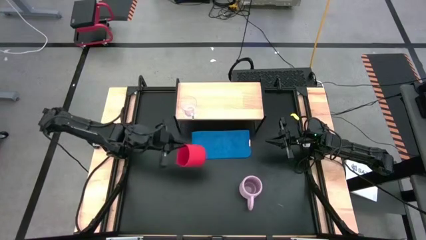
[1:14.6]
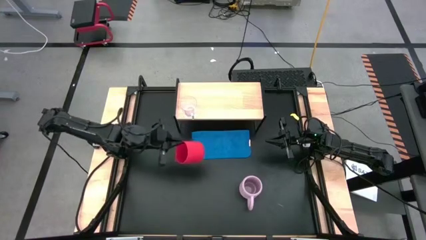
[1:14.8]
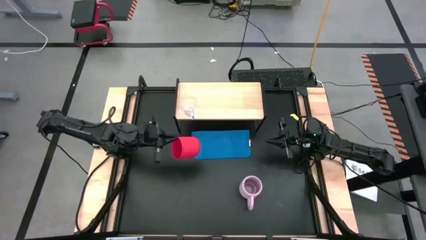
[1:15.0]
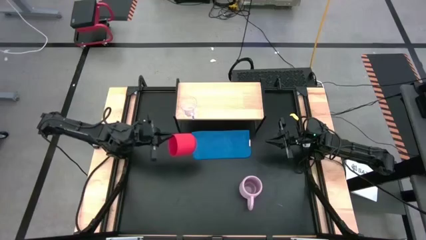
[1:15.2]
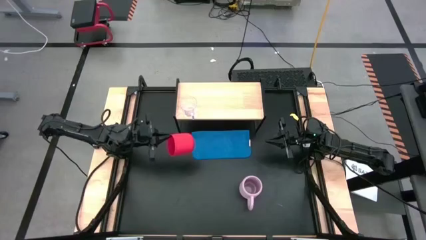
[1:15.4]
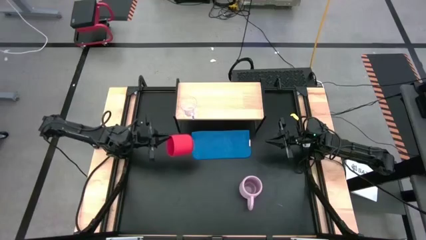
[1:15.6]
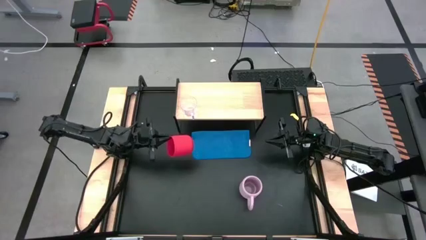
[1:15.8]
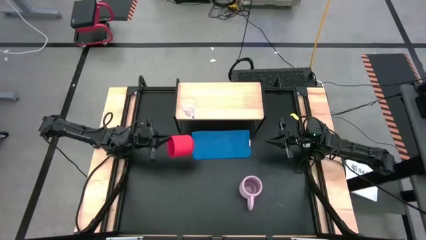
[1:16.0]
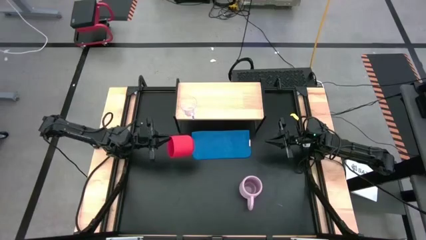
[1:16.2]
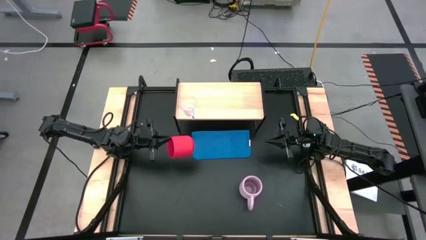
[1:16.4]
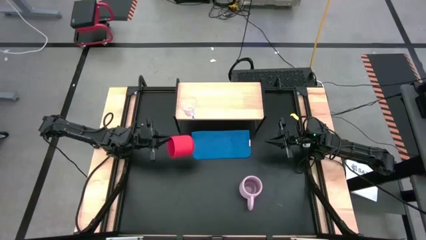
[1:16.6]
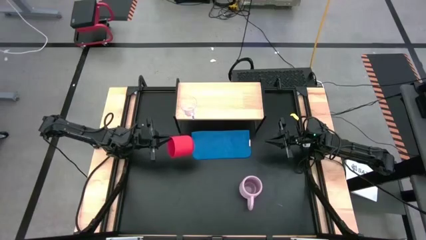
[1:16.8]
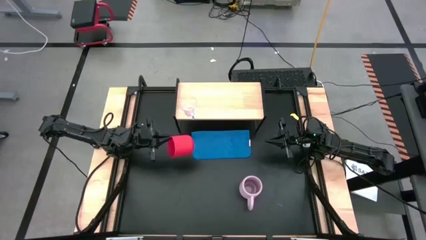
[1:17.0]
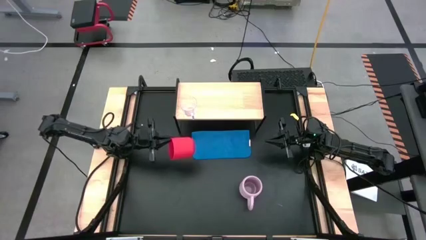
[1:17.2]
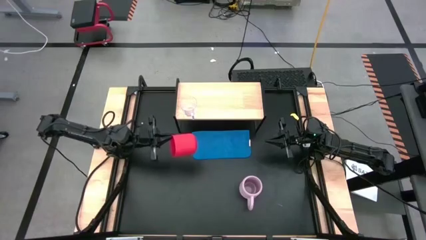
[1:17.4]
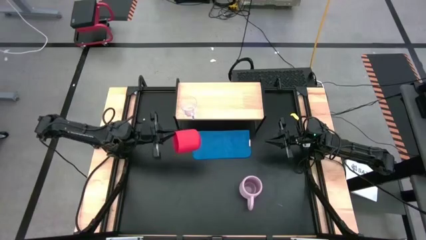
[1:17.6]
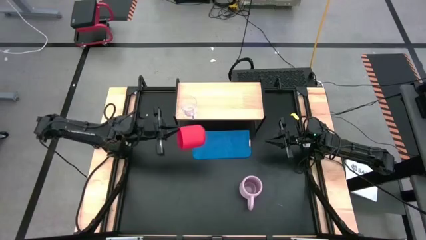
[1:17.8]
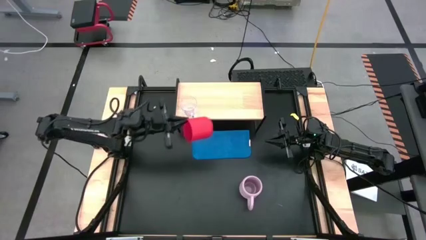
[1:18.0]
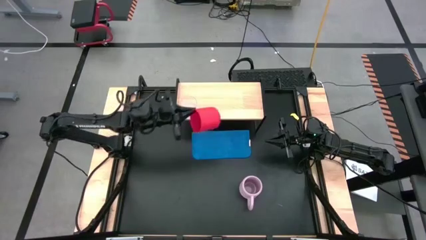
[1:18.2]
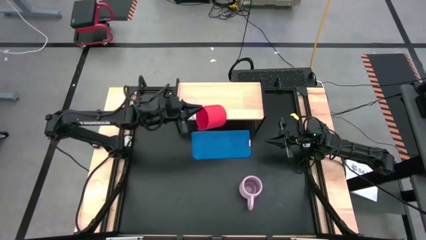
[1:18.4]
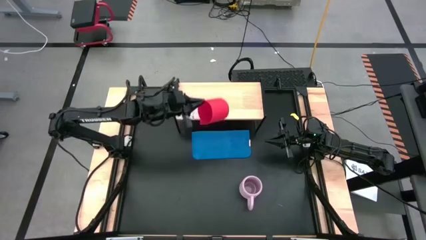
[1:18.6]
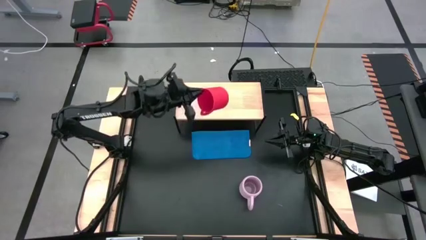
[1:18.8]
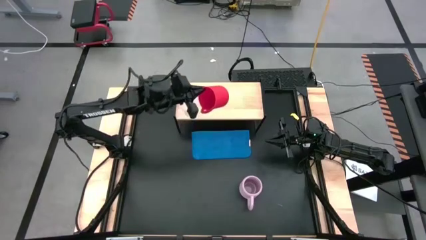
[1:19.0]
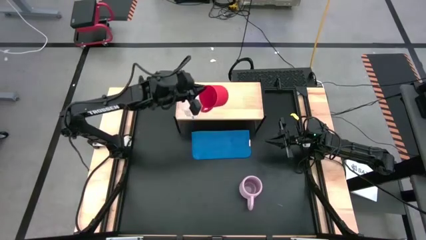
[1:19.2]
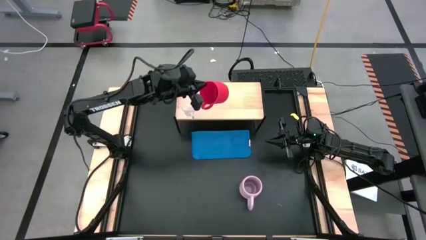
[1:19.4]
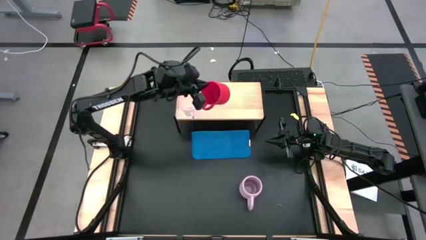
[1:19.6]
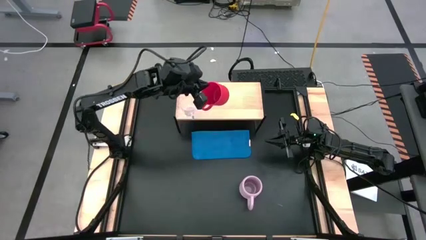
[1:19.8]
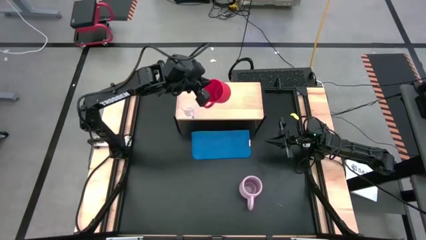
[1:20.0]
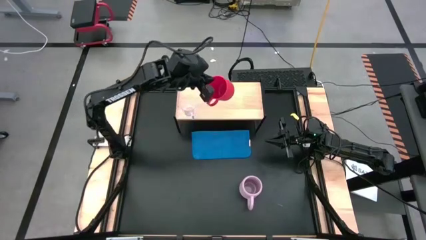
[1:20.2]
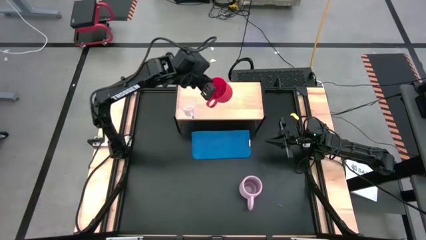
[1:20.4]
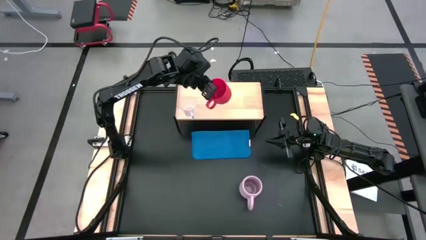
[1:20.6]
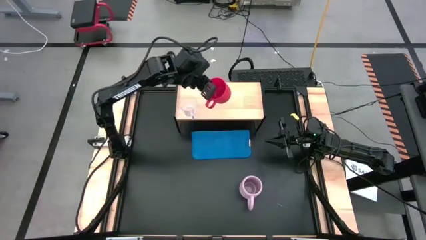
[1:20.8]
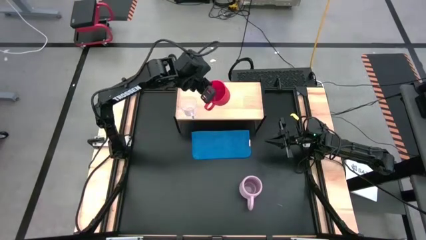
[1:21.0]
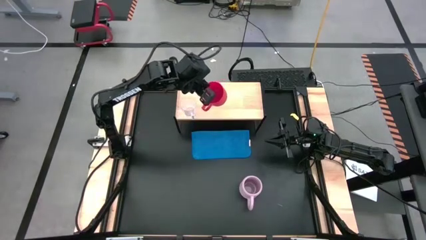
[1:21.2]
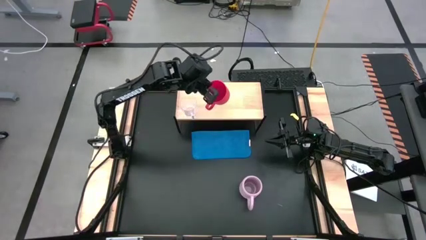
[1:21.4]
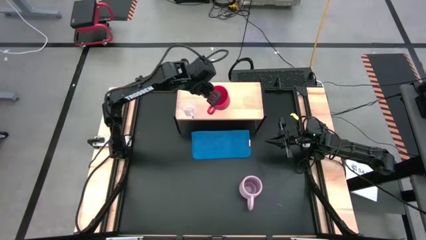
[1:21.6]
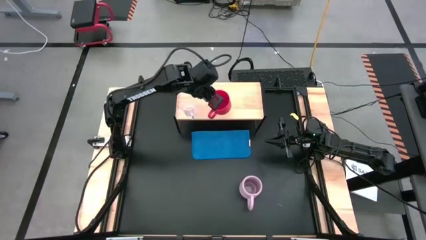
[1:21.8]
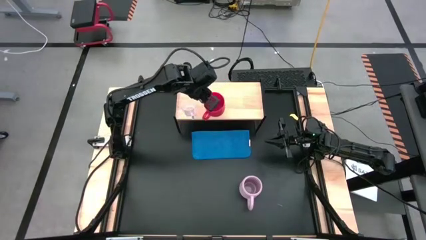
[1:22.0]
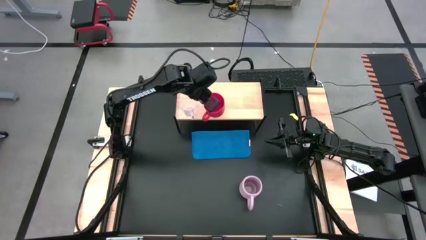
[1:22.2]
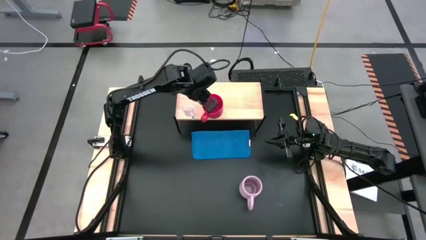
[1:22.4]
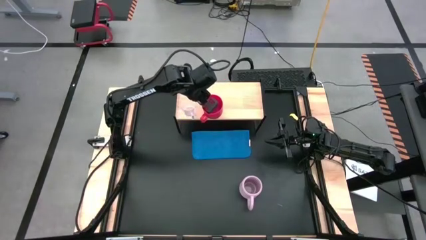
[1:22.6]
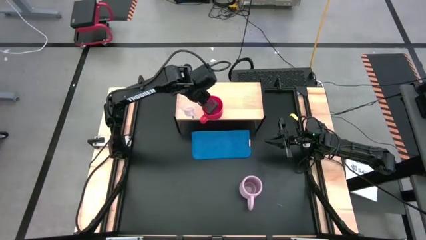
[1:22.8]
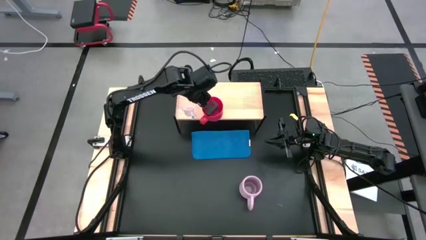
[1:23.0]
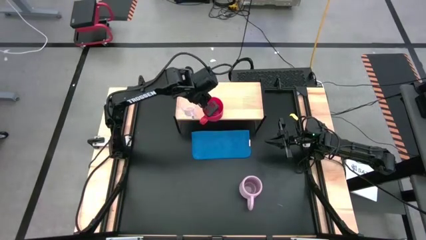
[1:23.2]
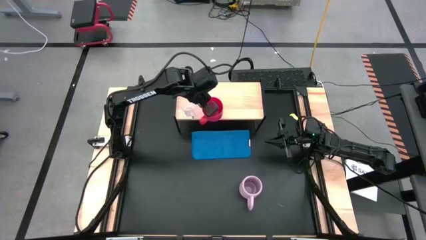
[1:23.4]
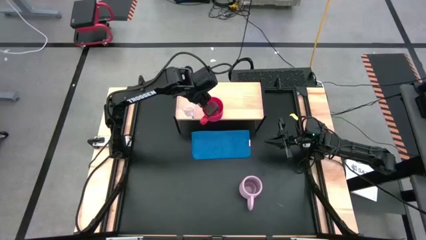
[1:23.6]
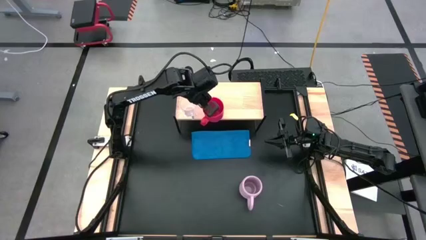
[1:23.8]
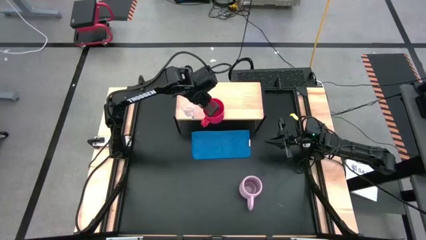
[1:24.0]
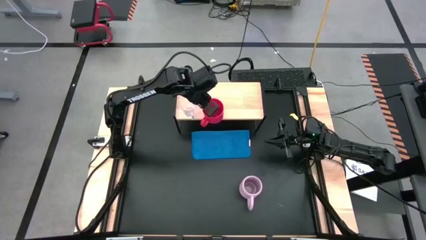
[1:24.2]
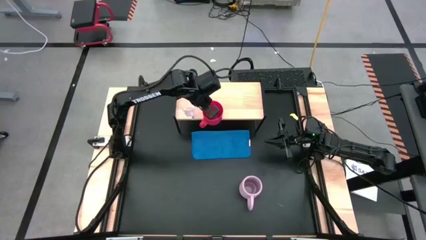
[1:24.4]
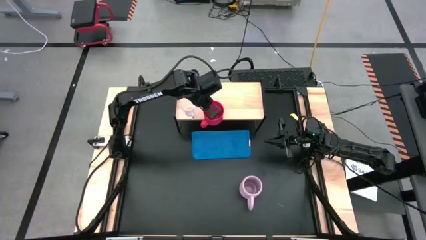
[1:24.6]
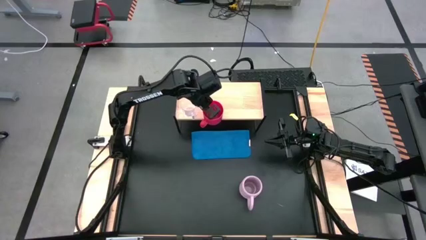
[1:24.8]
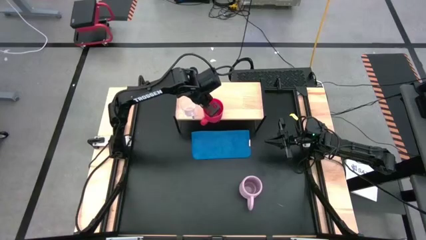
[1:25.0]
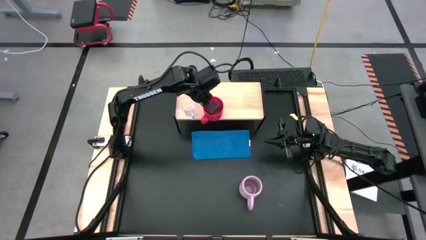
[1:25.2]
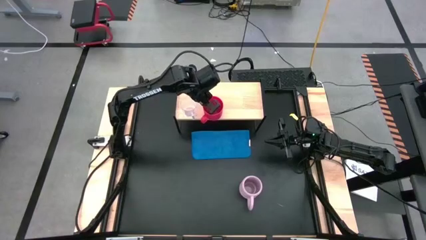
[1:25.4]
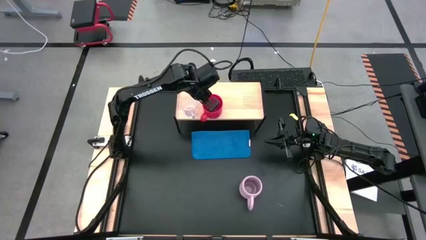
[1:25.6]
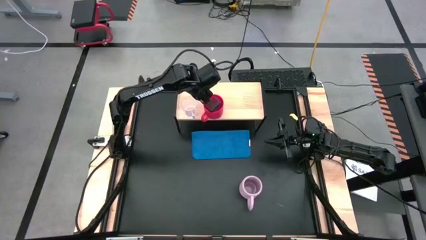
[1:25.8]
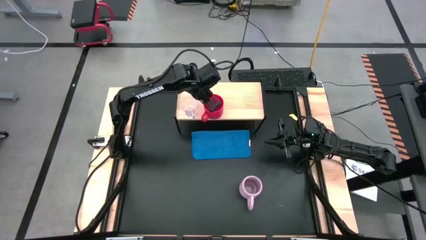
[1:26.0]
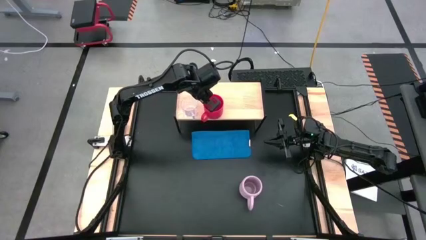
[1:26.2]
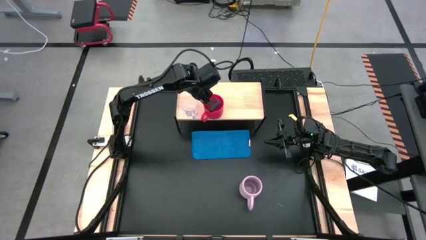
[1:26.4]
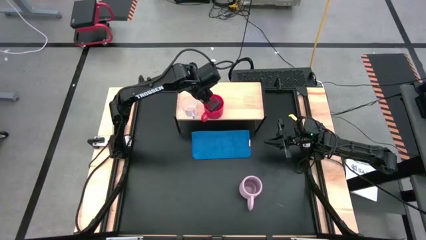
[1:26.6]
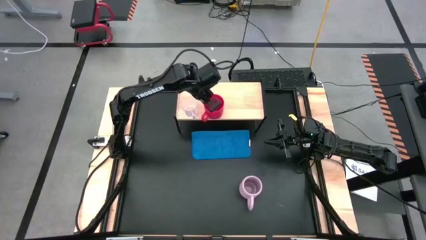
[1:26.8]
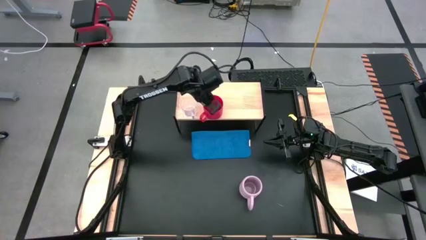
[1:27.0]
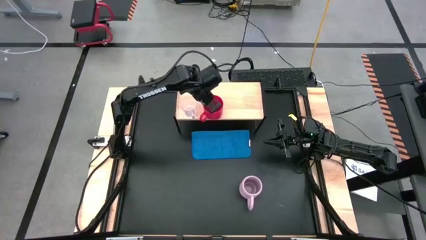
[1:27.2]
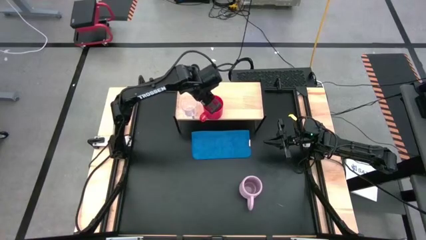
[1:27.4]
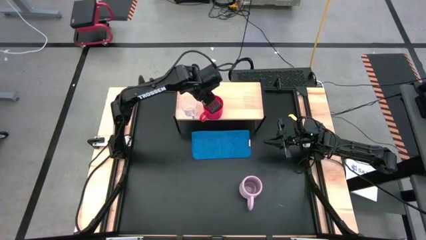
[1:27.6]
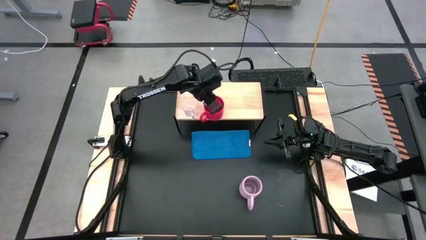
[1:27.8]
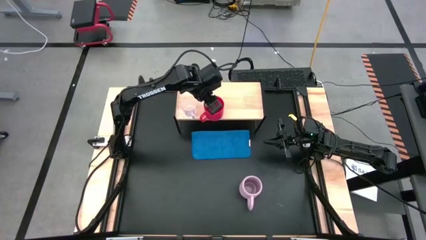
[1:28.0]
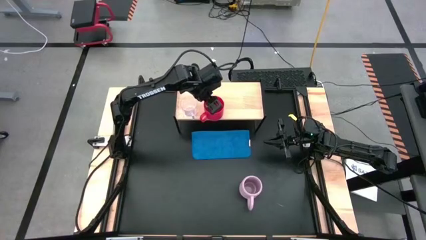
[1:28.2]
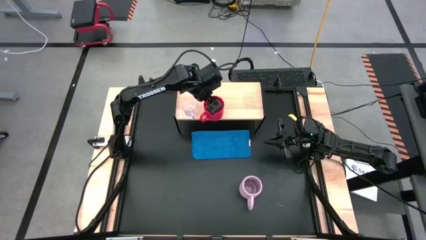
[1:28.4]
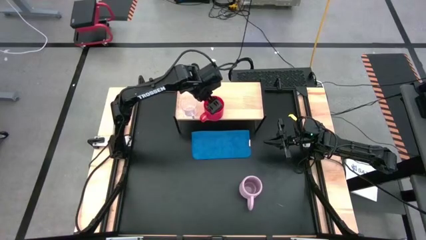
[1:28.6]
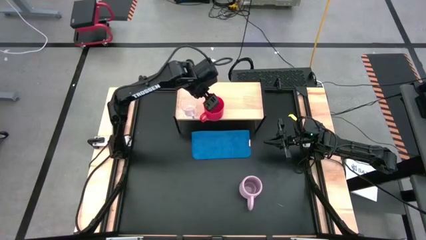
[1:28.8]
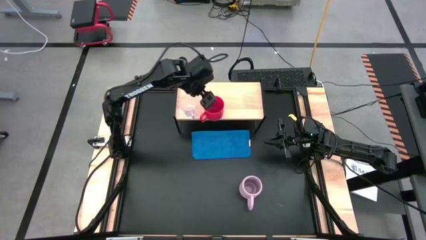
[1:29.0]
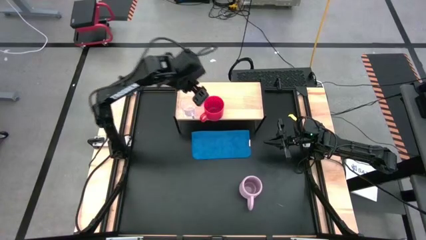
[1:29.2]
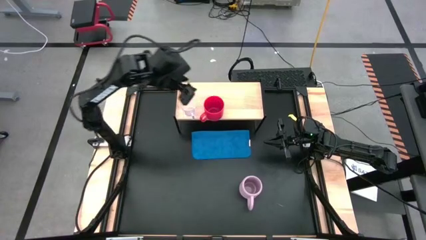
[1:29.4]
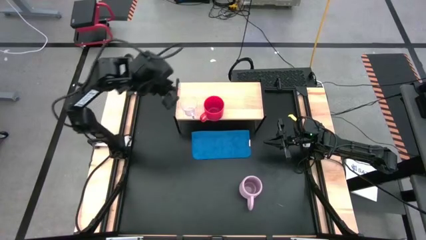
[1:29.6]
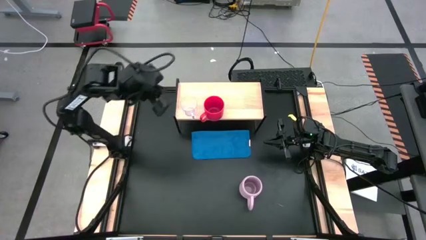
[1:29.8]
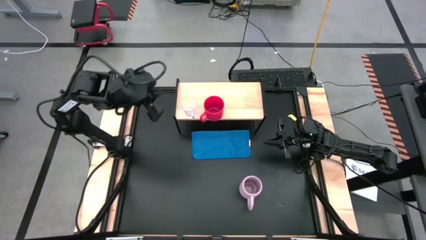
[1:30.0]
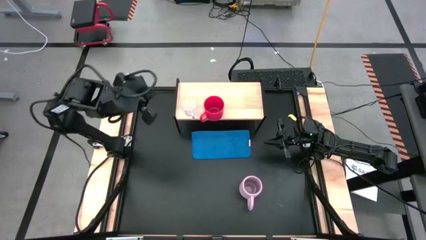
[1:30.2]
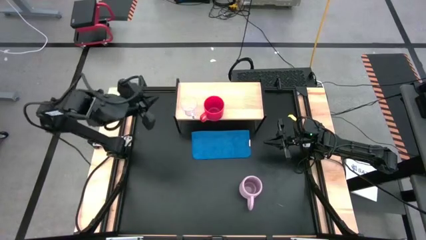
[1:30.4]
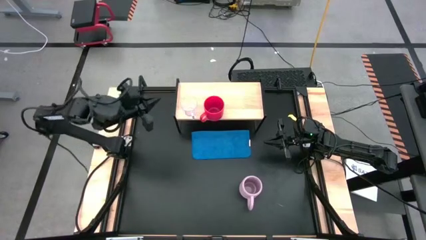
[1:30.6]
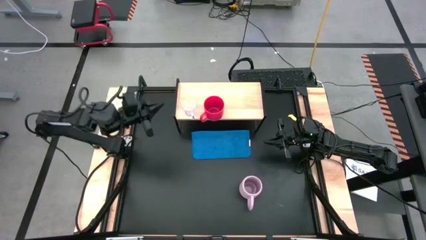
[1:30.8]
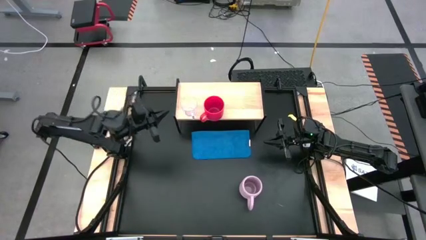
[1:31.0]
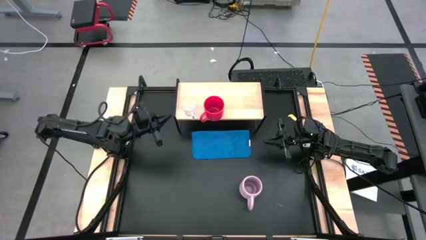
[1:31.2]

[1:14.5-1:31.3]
Task: Stack small to large cups/mugs on shelf
Put the red mug on the shelf
